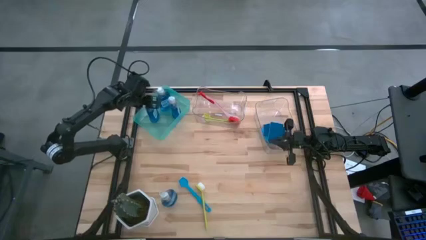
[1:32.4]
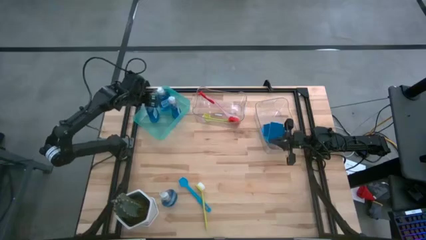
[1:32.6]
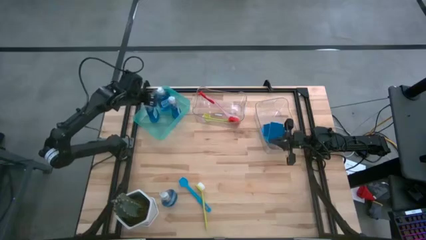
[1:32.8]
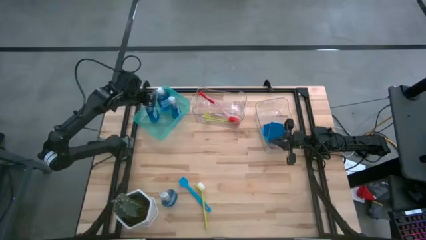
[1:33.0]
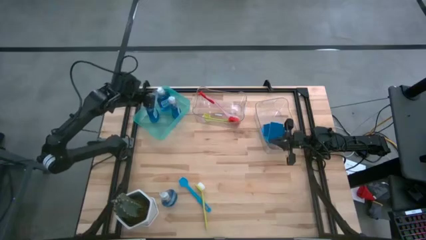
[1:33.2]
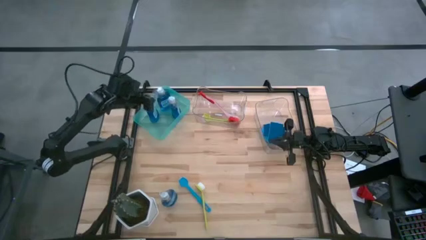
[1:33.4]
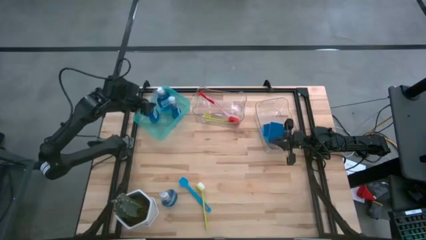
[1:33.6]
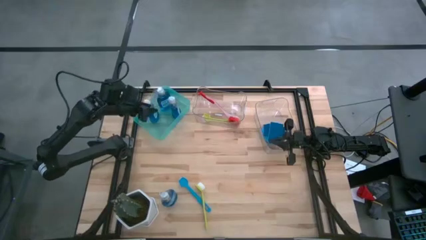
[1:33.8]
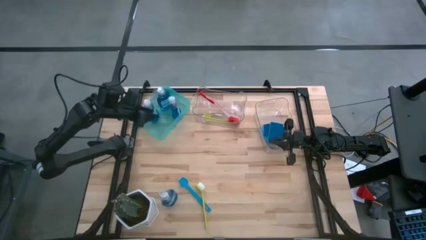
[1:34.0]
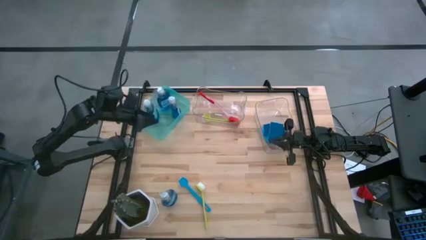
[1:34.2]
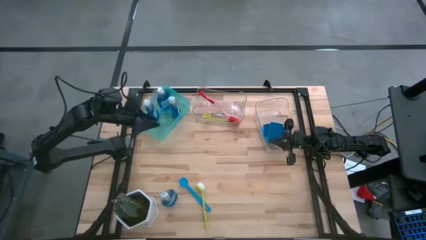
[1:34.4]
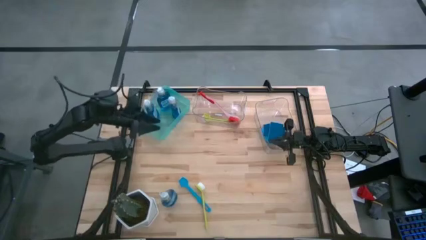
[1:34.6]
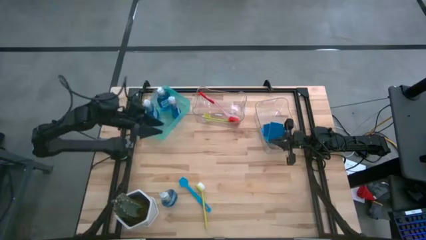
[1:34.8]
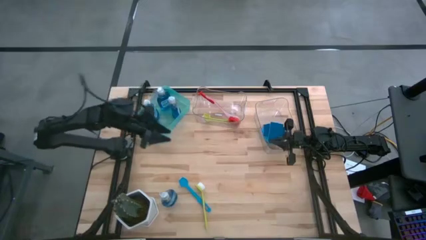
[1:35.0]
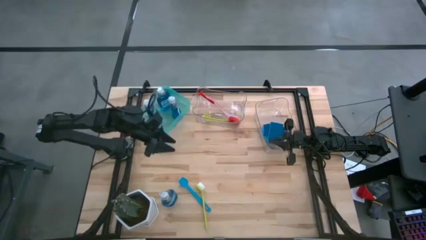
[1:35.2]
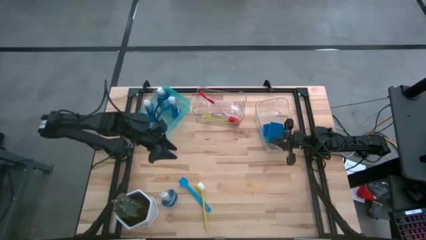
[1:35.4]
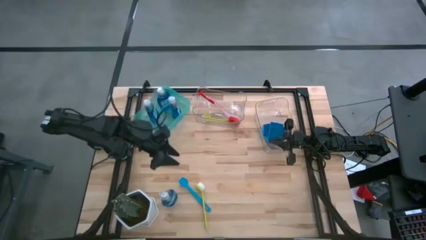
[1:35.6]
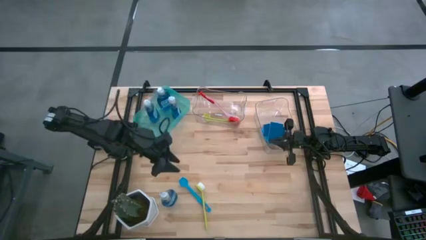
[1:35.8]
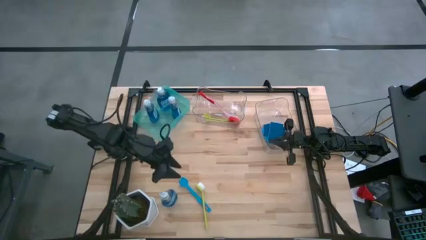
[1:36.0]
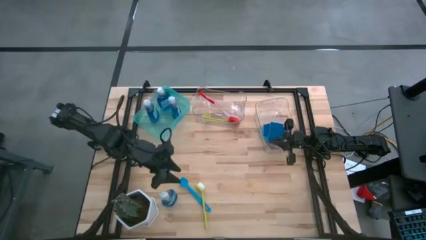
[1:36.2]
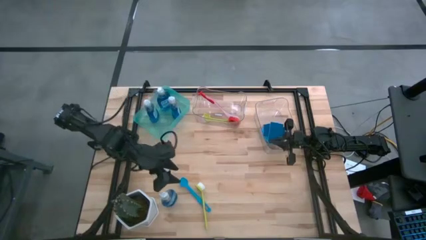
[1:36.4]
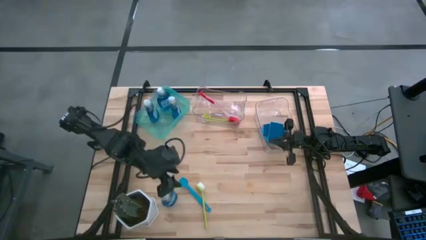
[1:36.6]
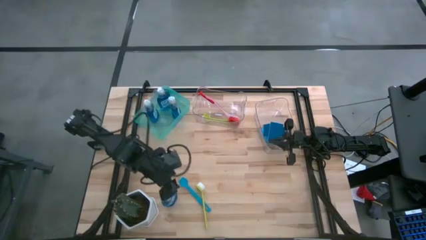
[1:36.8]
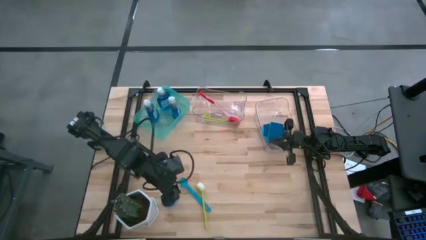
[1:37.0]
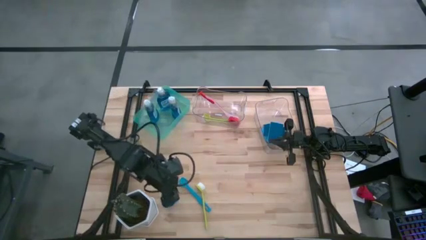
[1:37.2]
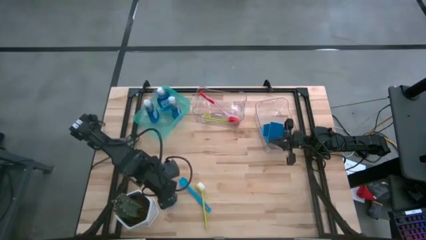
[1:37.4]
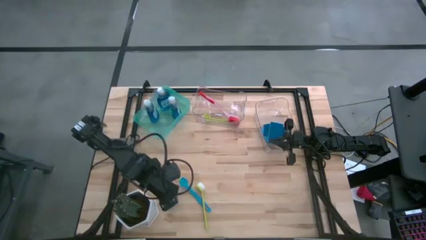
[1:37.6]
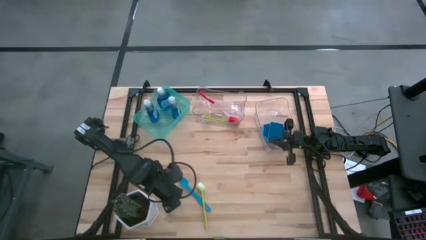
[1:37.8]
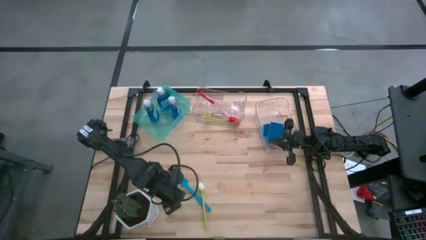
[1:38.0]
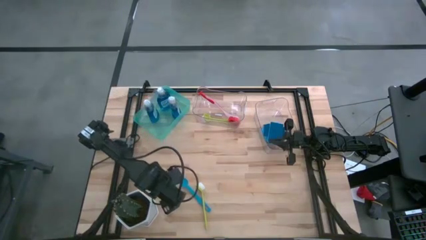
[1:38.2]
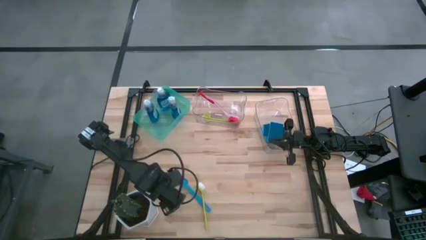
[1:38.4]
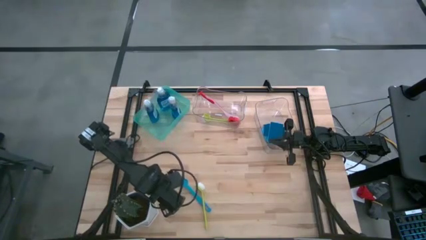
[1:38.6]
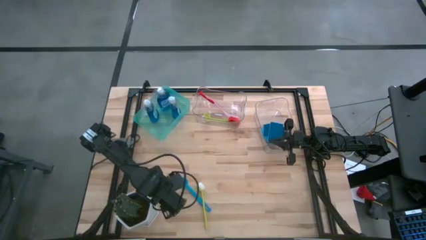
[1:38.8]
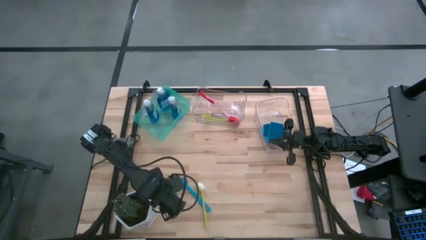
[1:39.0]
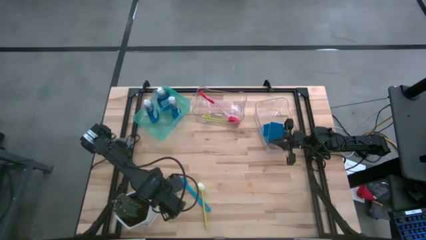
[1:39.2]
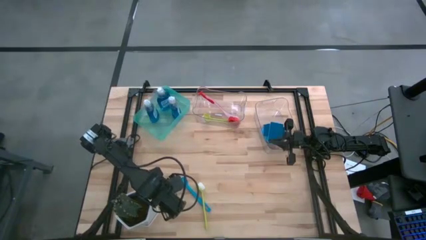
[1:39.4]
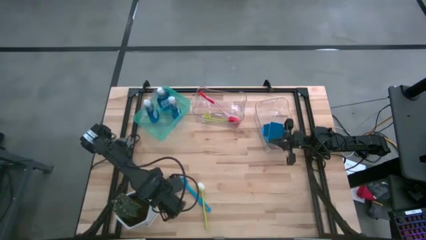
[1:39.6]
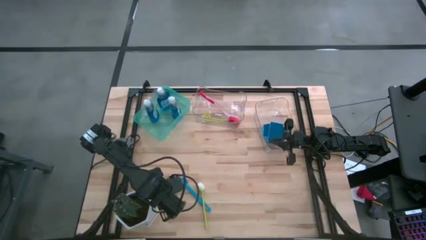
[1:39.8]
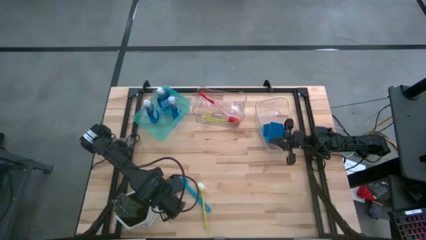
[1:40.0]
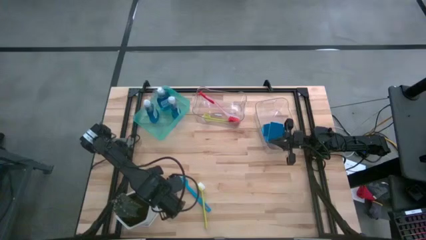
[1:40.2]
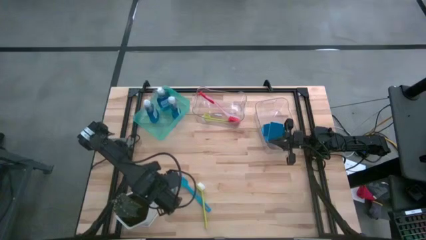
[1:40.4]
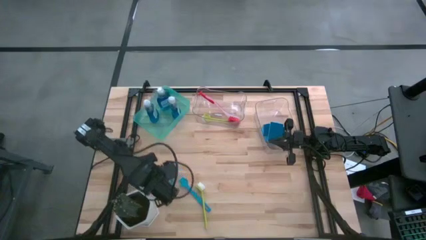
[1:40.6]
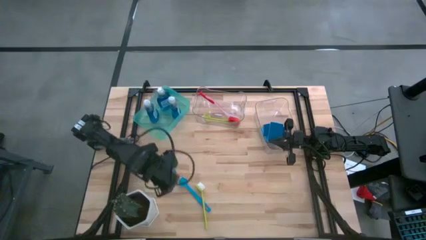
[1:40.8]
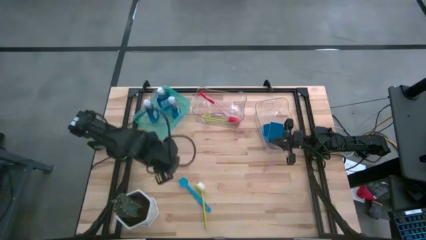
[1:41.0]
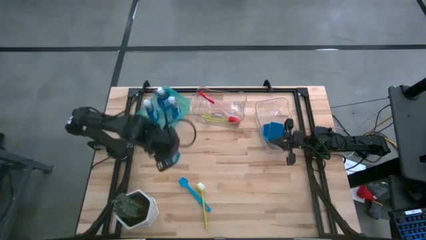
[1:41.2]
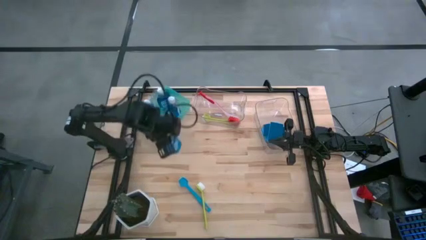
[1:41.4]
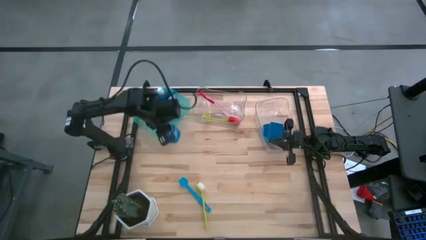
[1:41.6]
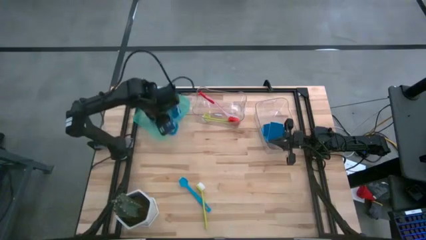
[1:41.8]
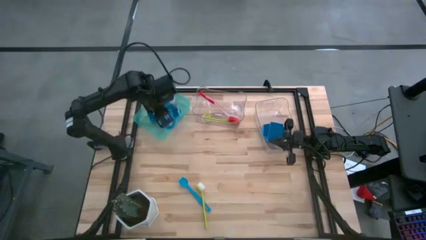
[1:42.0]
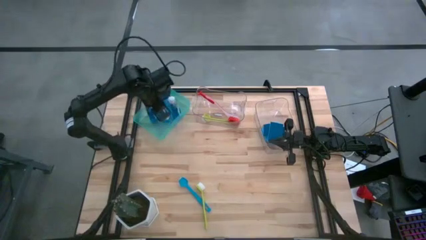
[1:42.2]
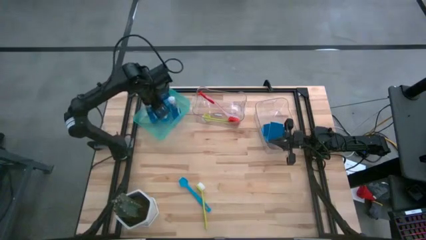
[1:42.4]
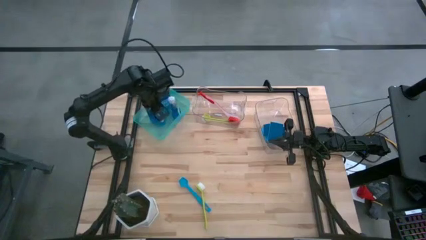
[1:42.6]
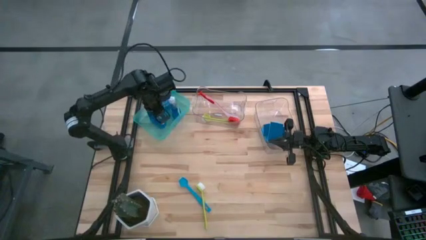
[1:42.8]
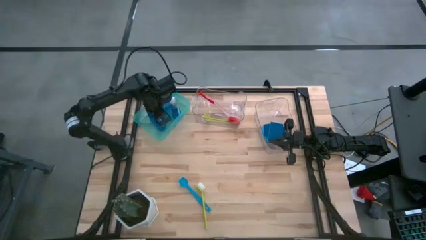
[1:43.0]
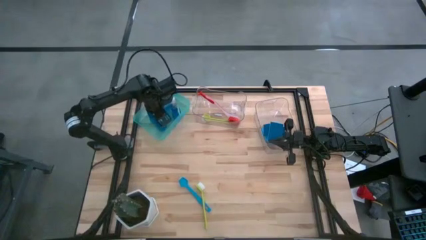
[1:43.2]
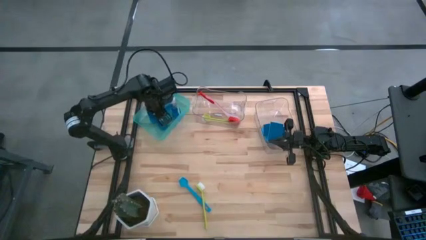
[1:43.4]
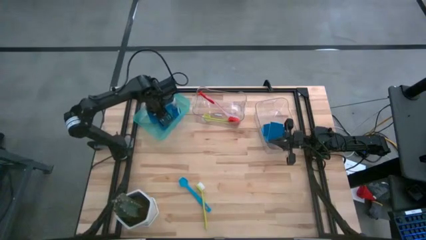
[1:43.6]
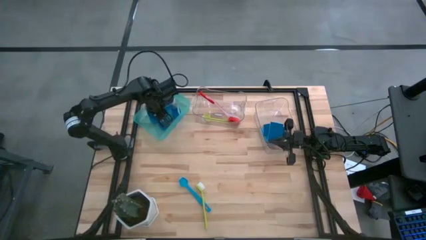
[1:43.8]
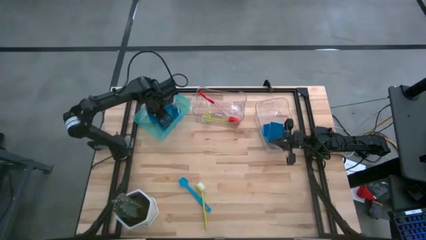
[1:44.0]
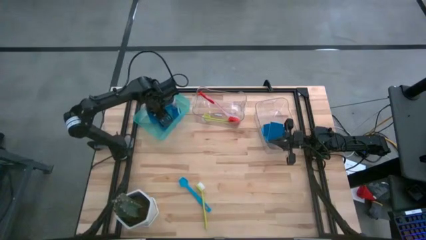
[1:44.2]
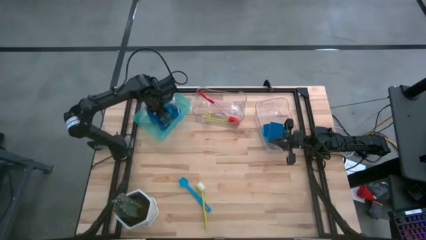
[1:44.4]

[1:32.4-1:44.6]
Task: Pick & Place Kitchen Sink Supplies
Put the transparent soap dispenser in the green bin
